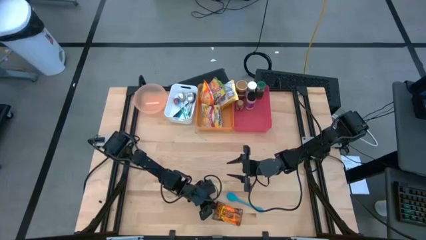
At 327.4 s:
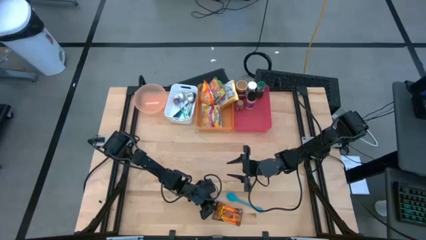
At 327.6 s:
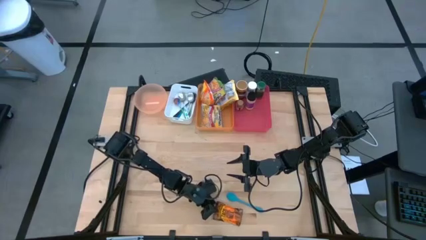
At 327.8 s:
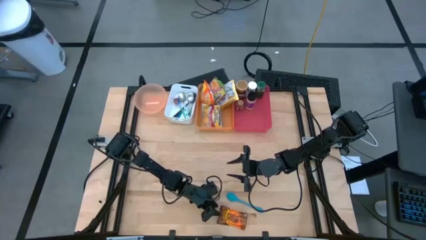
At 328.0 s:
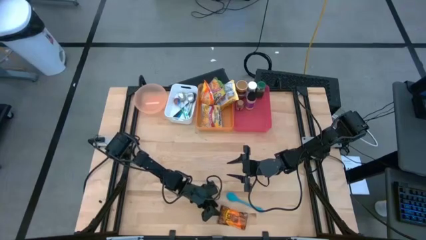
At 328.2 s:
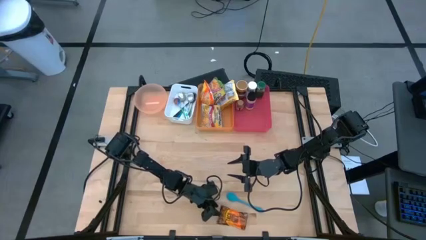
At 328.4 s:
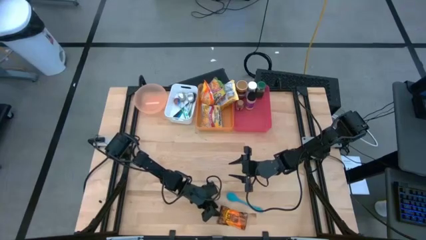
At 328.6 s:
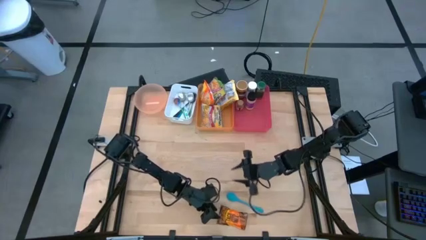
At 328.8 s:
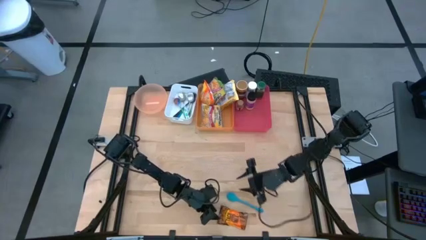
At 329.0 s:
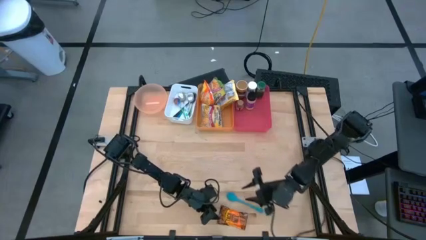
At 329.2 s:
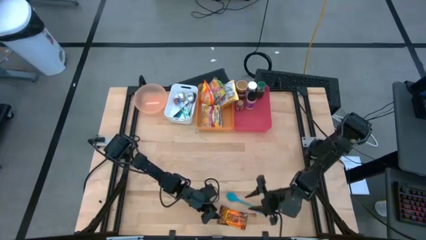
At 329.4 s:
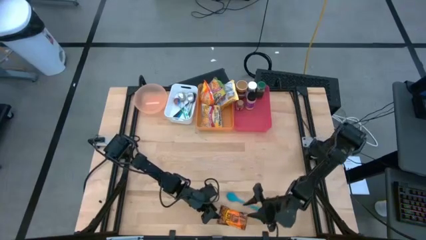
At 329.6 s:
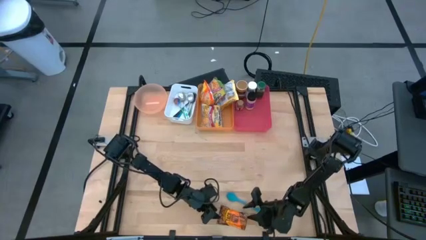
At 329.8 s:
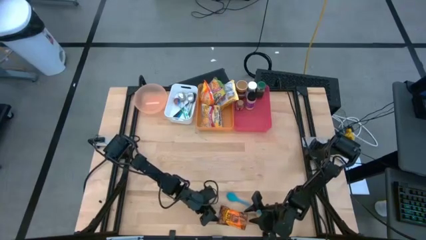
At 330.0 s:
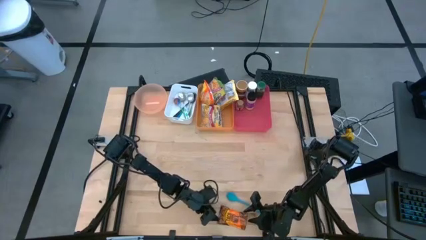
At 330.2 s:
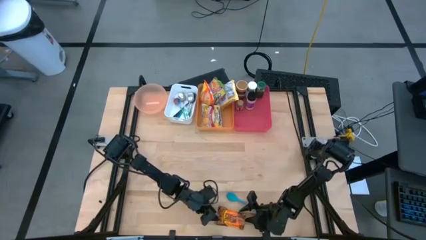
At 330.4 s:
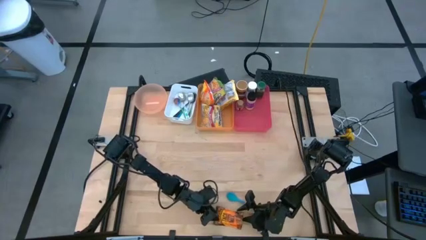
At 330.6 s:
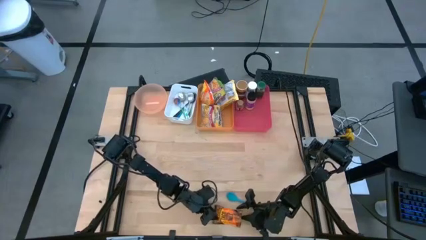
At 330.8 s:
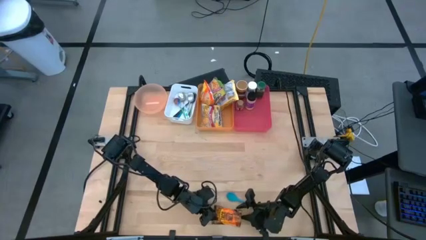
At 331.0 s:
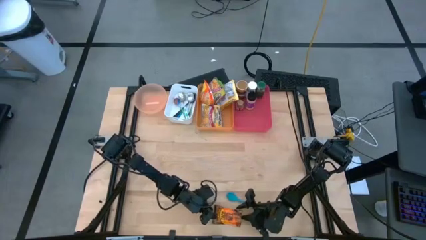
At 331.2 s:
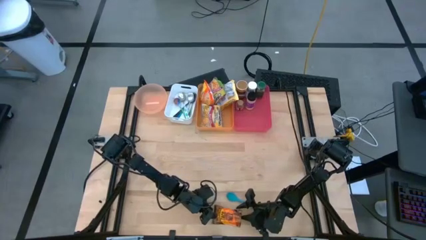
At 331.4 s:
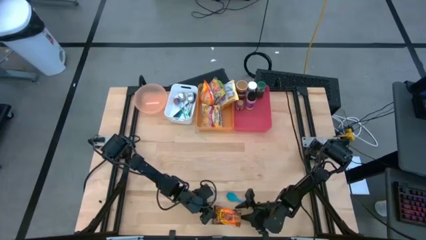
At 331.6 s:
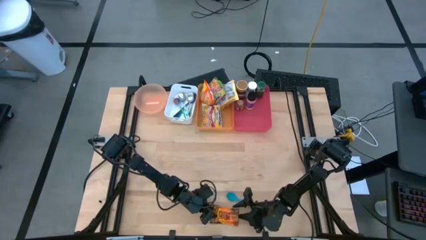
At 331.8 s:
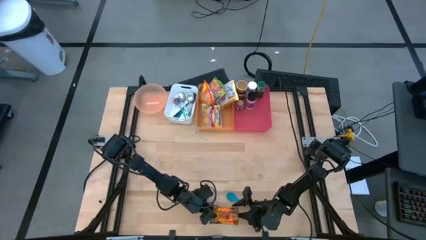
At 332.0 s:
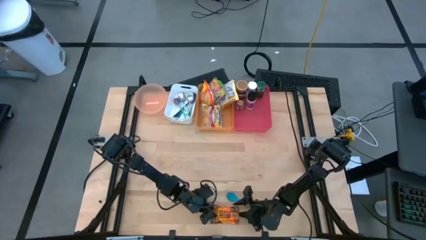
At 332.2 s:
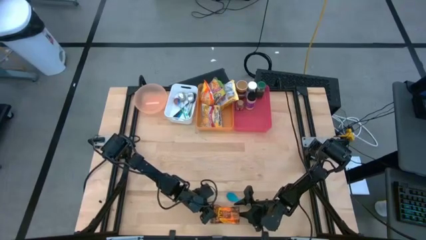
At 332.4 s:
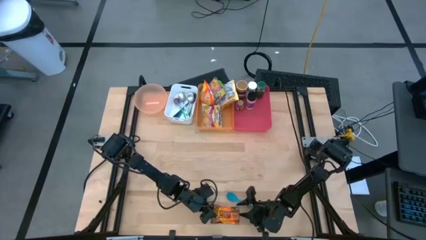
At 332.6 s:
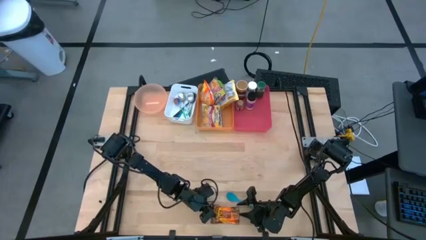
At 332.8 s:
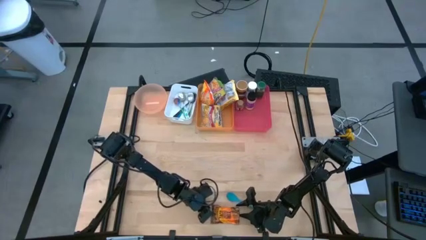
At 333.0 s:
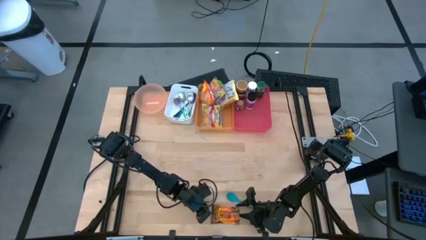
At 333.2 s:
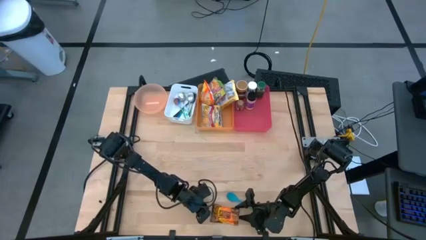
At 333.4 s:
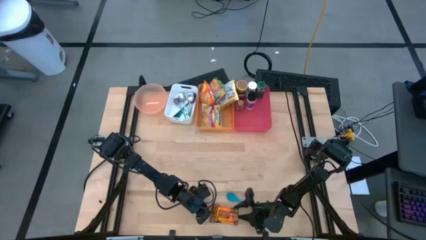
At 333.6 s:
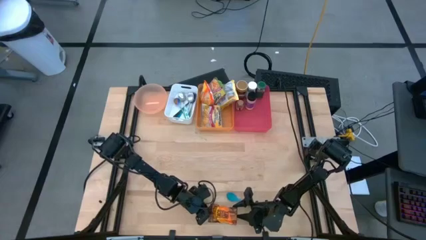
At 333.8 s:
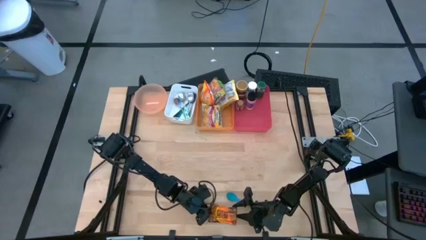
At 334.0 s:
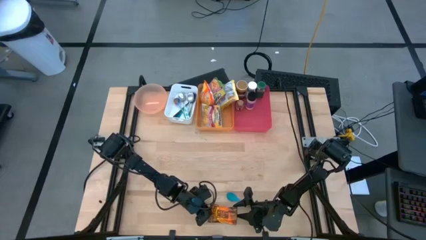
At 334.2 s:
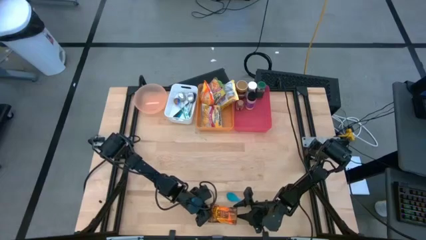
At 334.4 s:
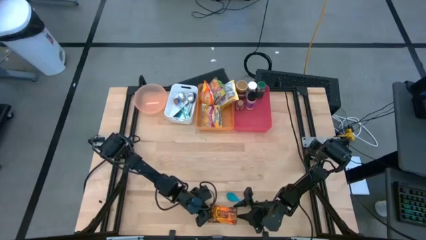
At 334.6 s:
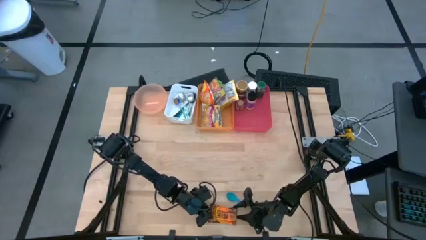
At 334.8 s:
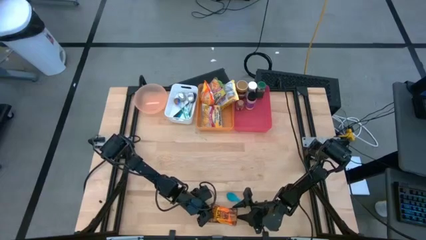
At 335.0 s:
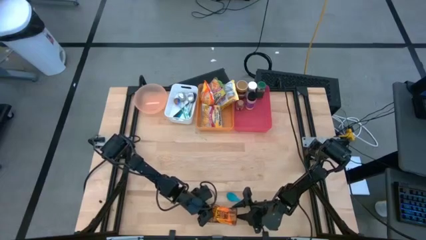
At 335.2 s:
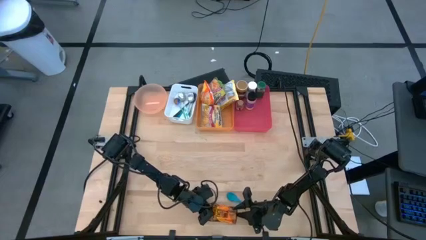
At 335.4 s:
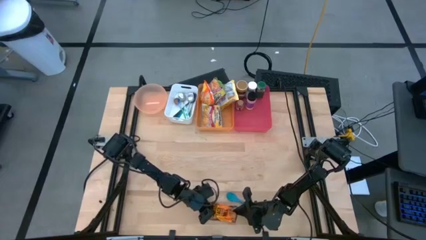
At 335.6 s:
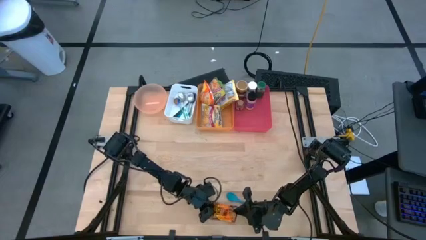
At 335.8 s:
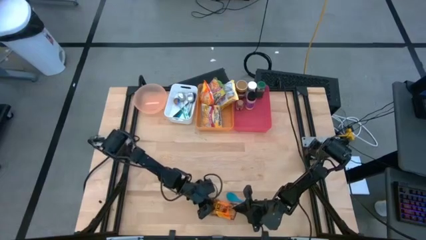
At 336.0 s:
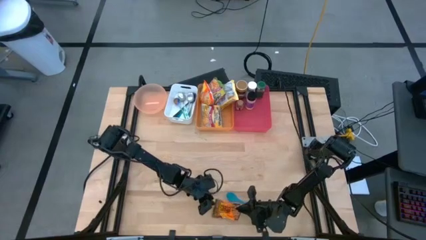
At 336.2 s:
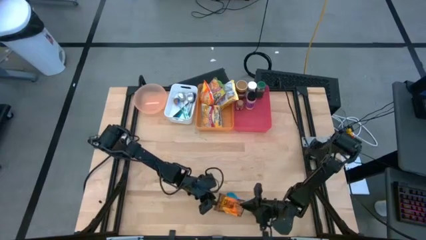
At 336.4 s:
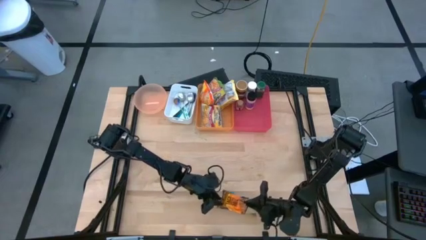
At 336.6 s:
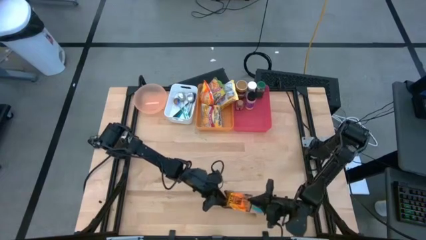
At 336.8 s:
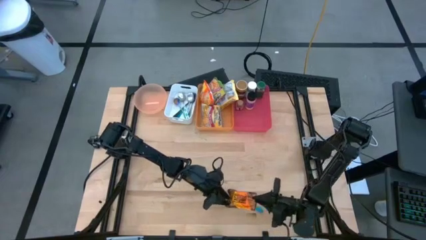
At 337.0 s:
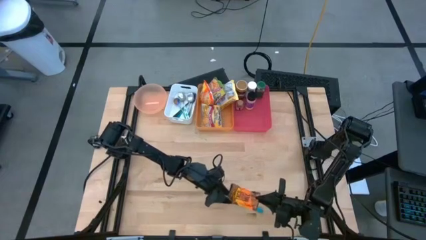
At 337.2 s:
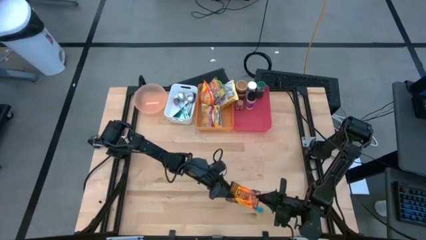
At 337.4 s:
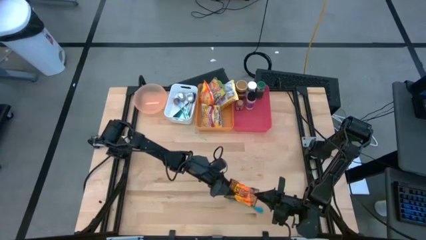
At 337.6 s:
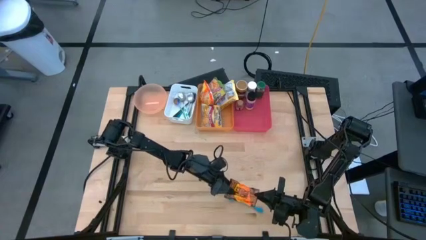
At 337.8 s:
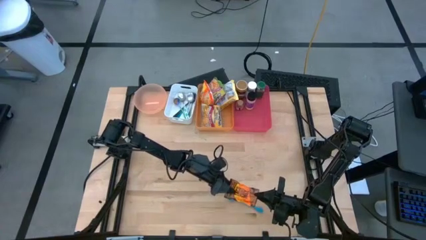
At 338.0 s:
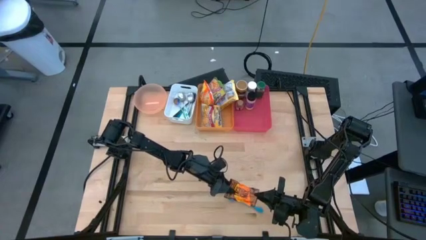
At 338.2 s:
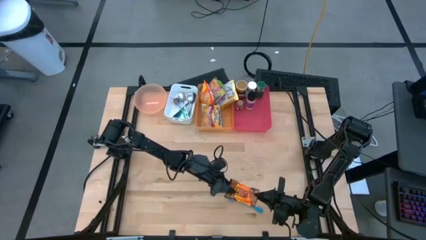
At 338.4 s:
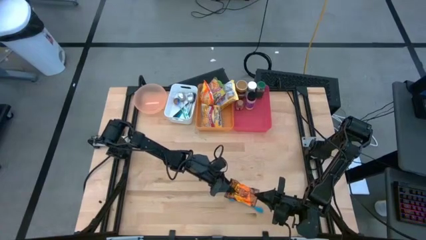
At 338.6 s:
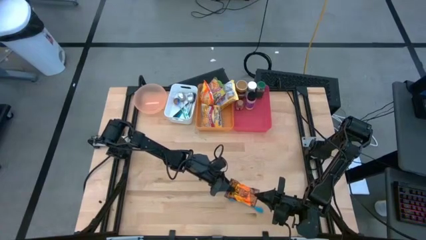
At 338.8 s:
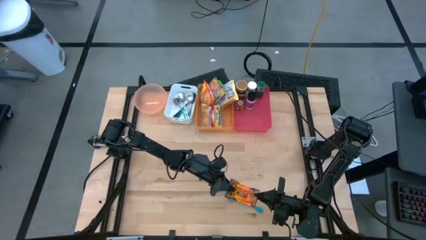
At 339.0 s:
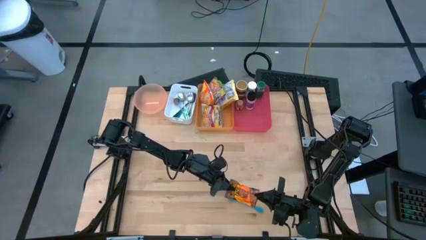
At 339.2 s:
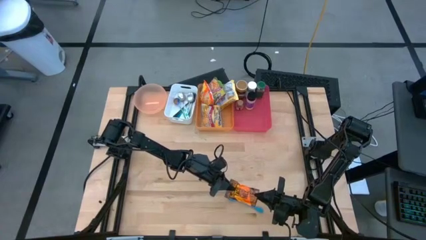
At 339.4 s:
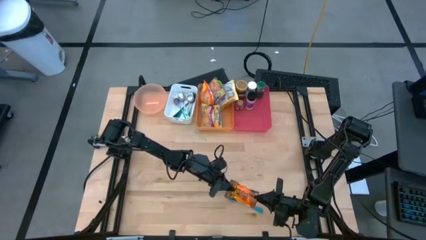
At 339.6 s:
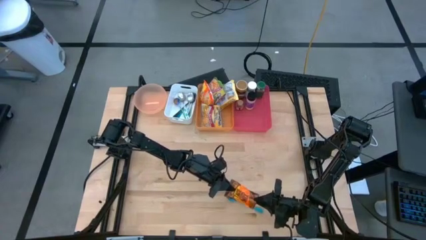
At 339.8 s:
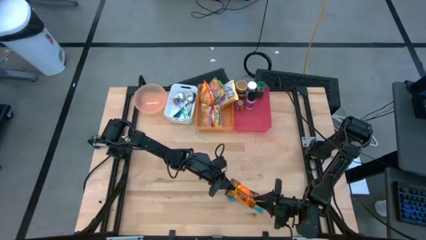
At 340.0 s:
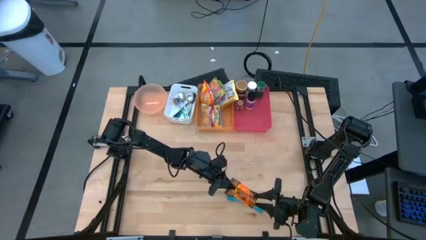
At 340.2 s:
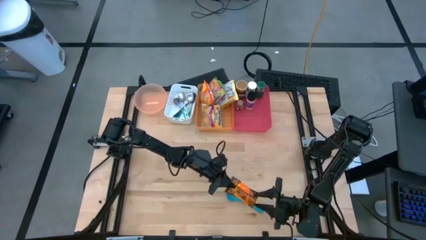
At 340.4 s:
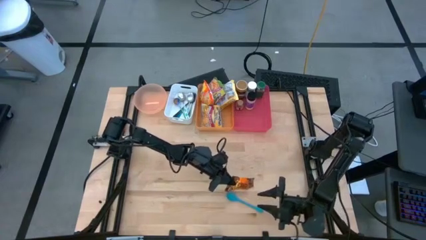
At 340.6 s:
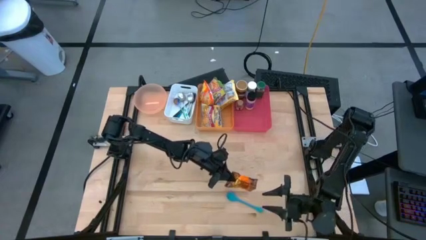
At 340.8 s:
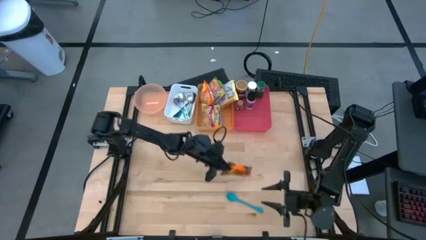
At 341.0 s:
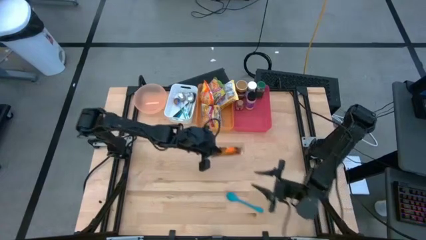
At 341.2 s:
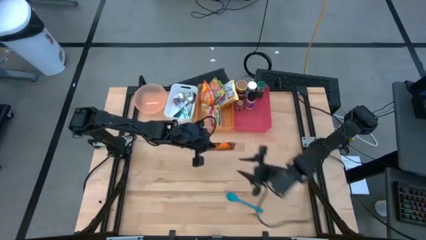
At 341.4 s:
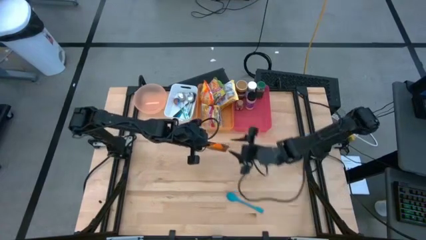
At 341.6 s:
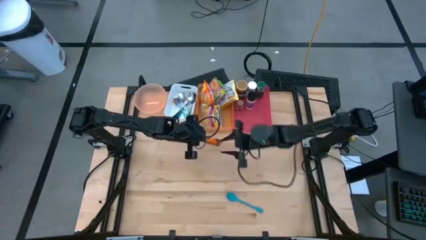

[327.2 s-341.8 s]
Task: Pick & Place Food Item
Put the orange seasoning pack into the red bin

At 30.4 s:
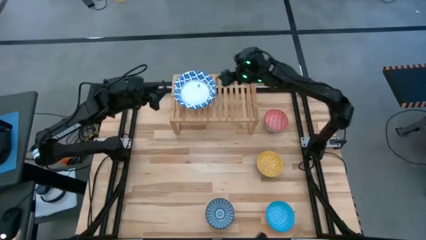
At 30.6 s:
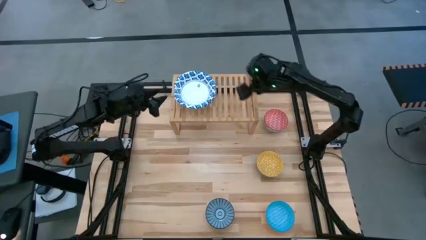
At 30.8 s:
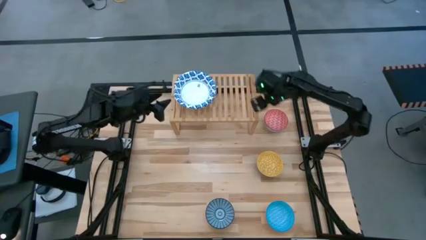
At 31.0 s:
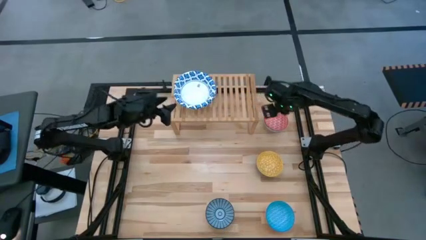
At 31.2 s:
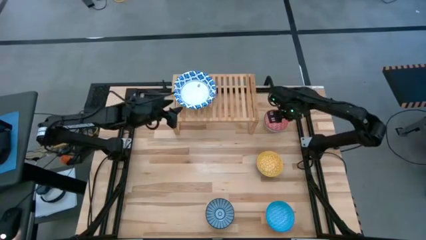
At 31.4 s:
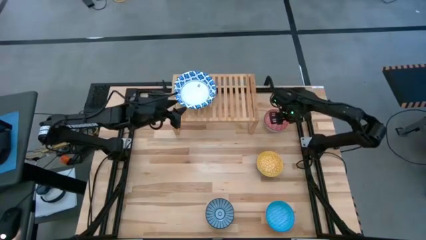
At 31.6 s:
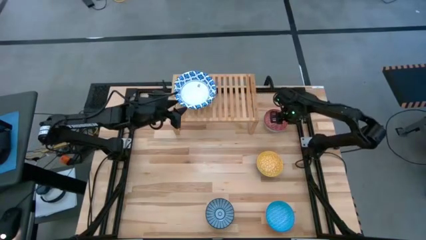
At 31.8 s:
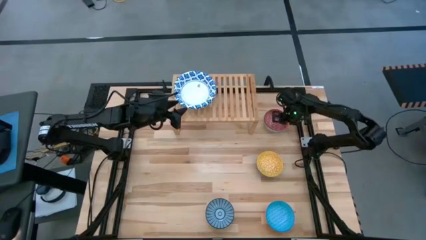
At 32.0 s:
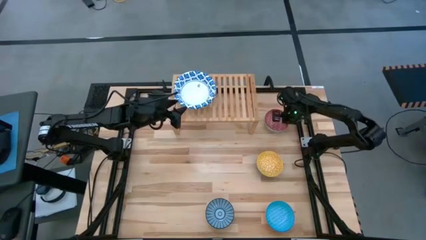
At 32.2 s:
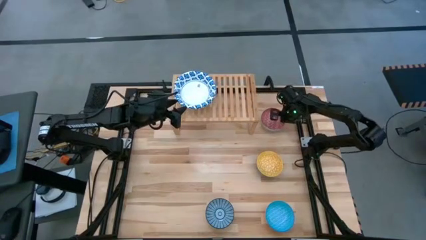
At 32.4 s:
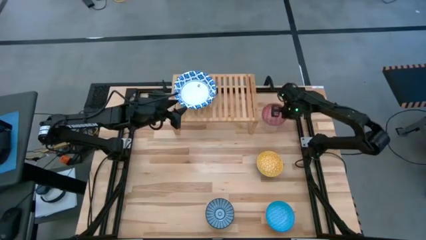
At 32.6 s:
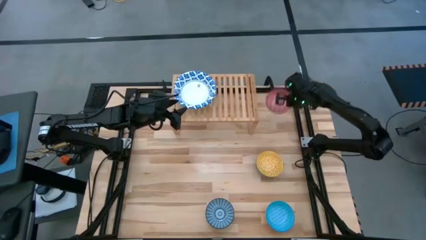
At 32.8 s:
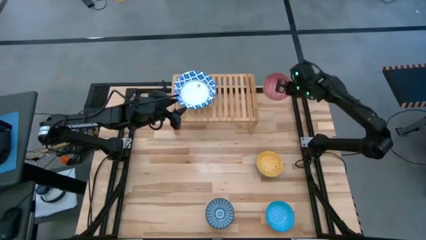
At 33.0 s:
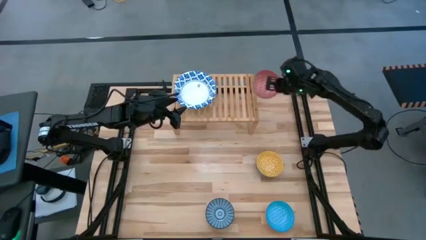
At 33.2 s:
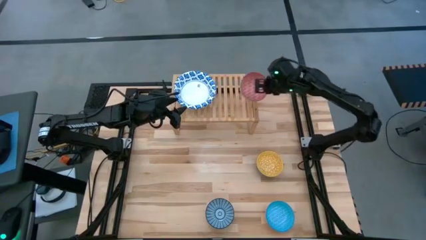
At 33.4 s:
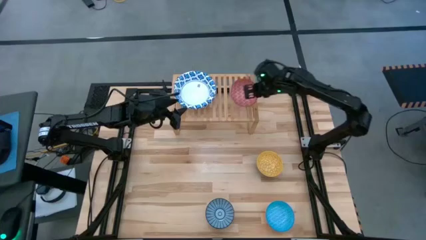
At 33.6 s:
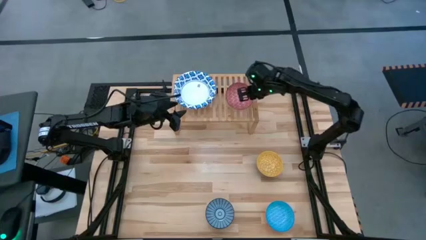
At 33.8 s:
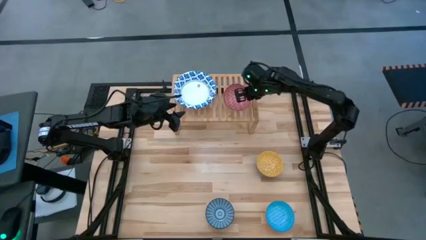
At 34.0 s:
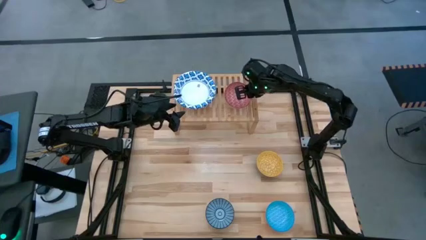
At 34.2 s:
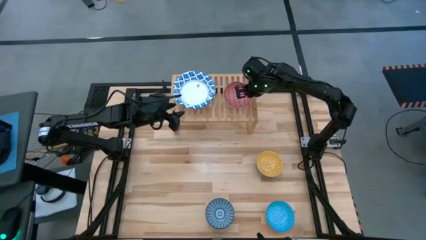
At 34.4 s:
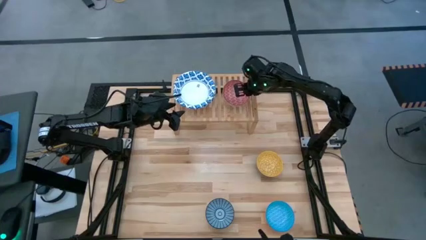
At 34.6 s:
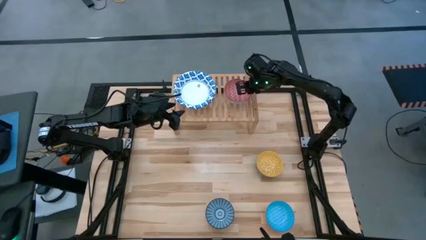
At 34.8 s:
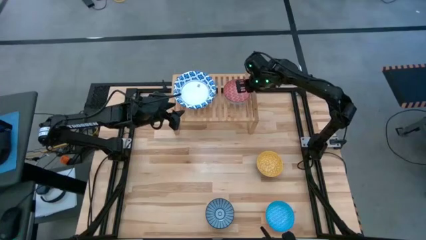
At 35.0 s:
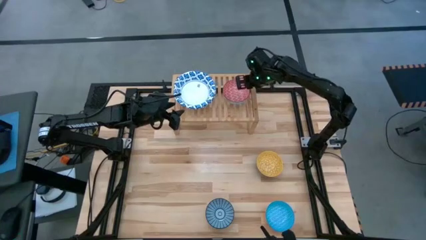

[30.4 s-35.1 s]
Task: Place and stack bowls onto a shelf
Put the small red bowl on the shelf
